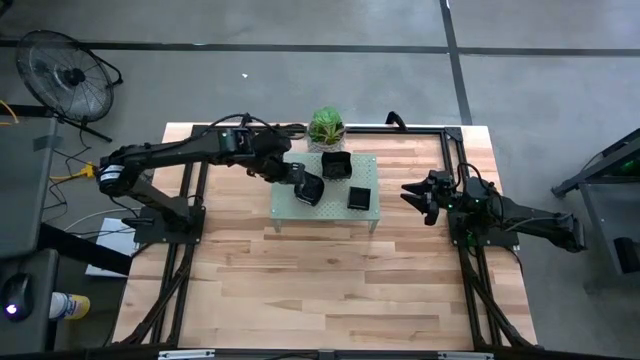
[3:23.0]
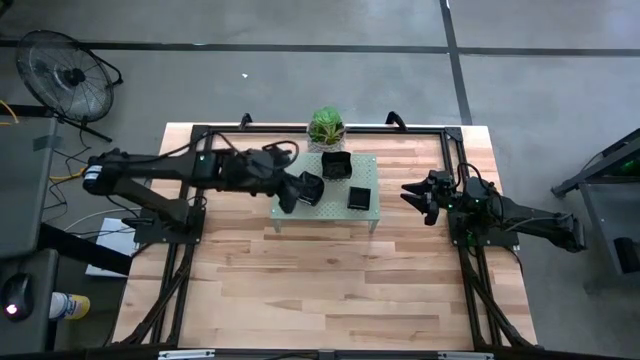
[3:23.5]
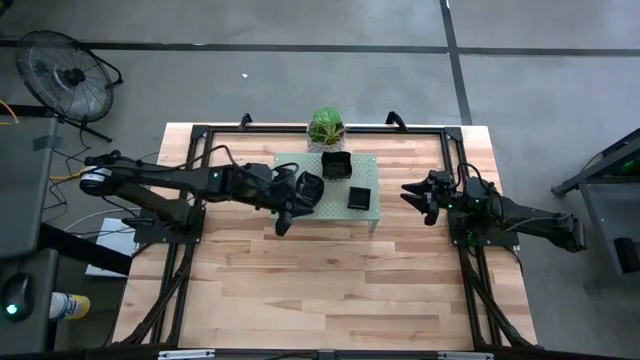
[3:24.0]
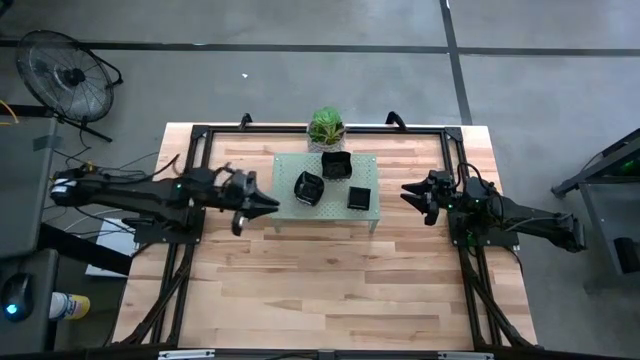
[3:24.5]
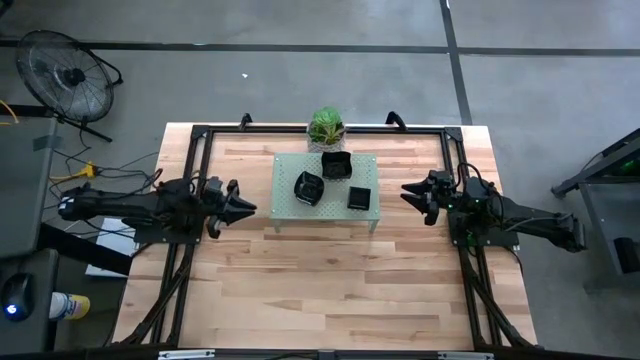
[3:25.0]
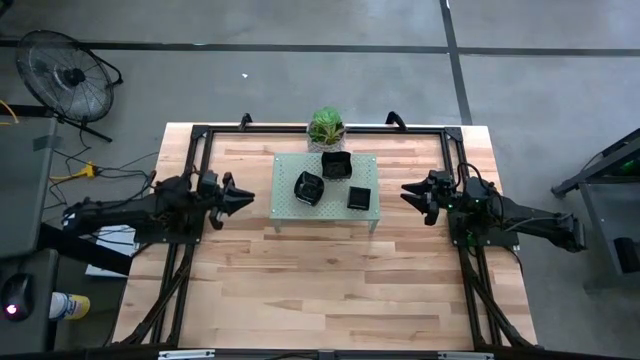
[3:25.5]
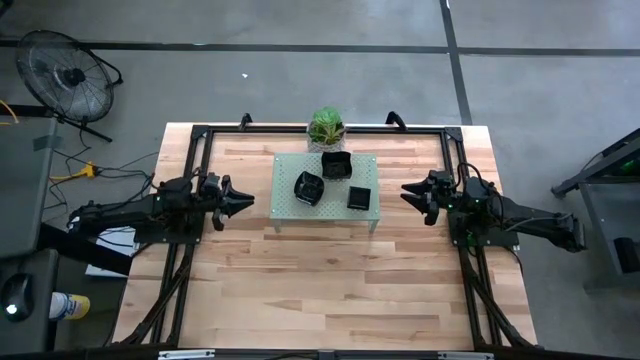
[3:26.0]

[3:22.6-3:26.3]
Task: Pick & Place Mini shaped plates
Return to Home Position

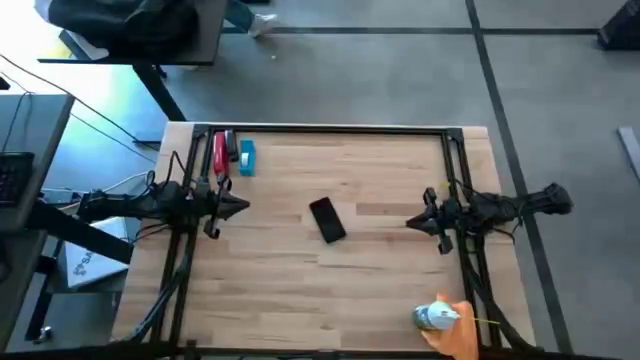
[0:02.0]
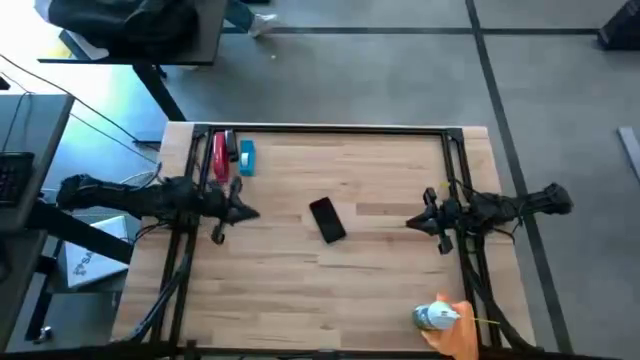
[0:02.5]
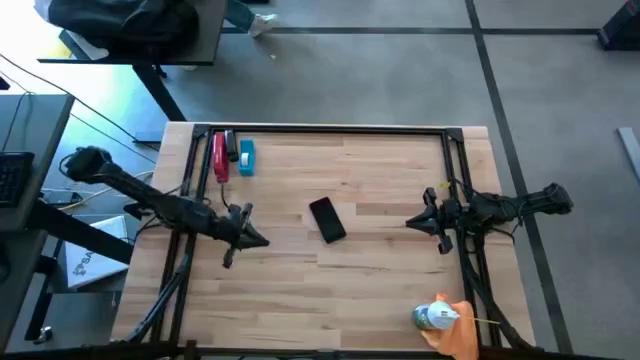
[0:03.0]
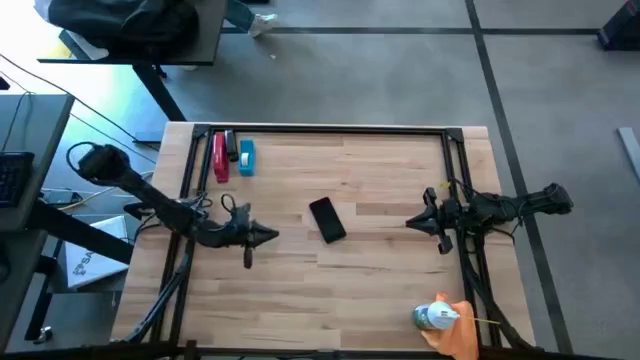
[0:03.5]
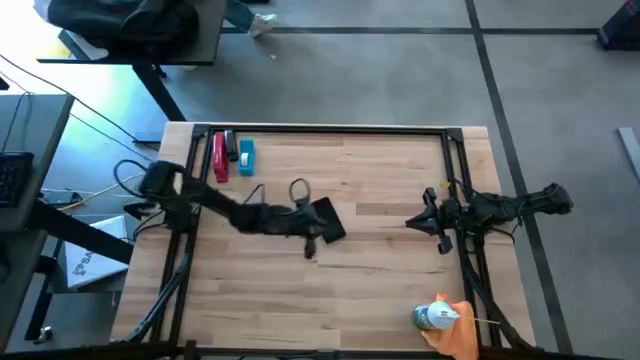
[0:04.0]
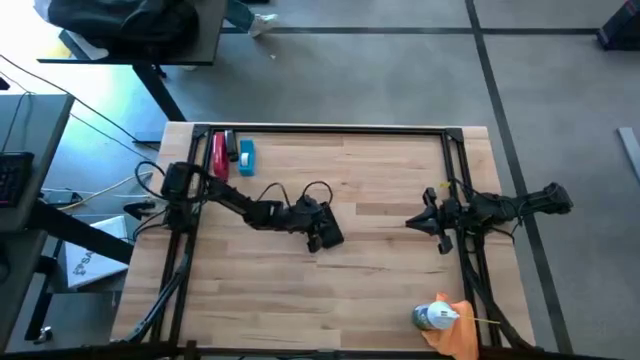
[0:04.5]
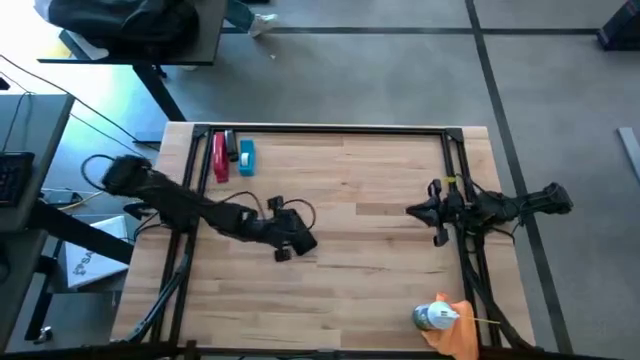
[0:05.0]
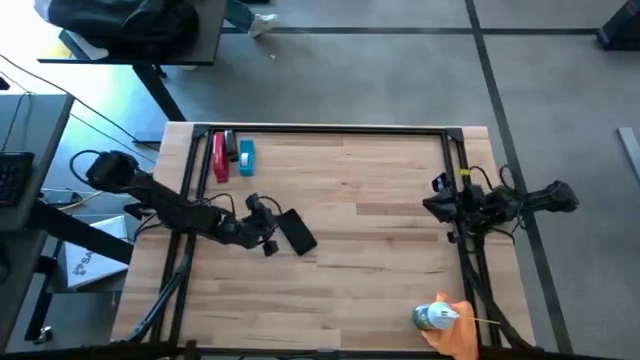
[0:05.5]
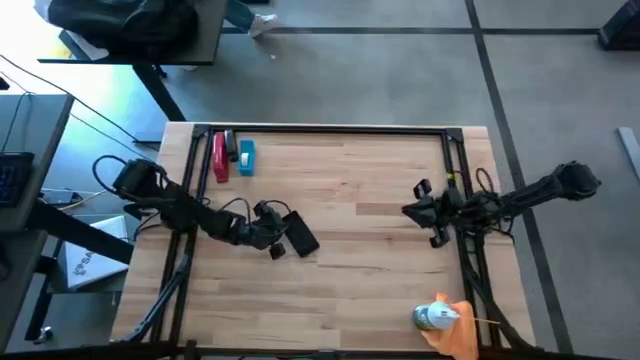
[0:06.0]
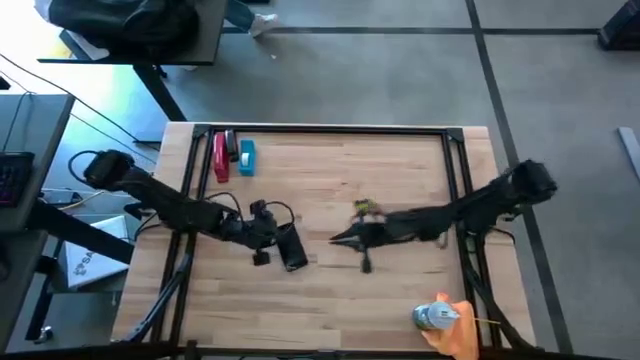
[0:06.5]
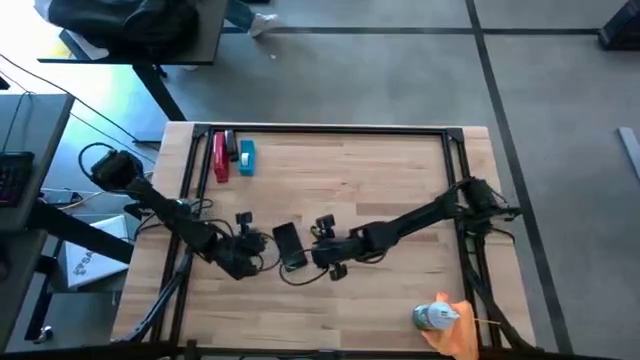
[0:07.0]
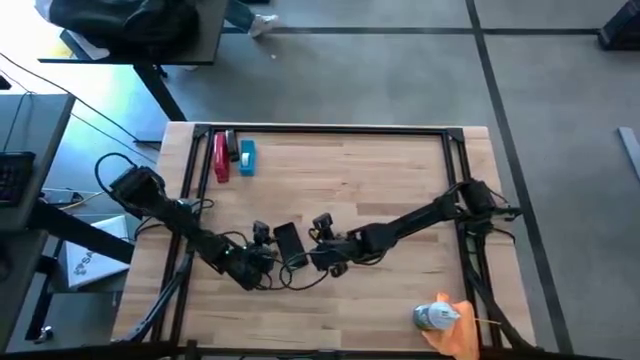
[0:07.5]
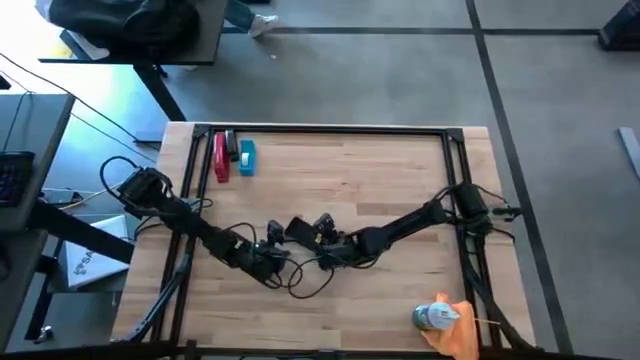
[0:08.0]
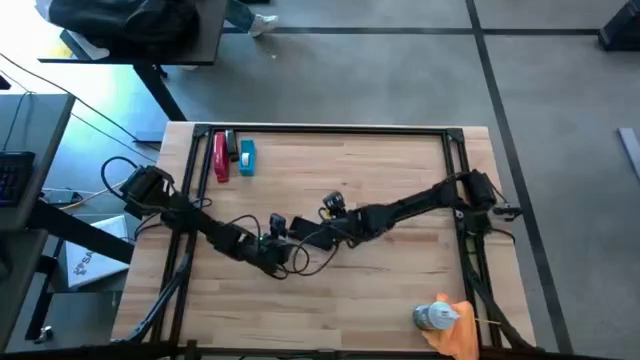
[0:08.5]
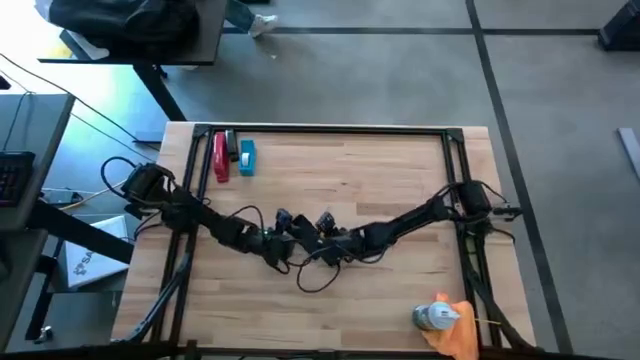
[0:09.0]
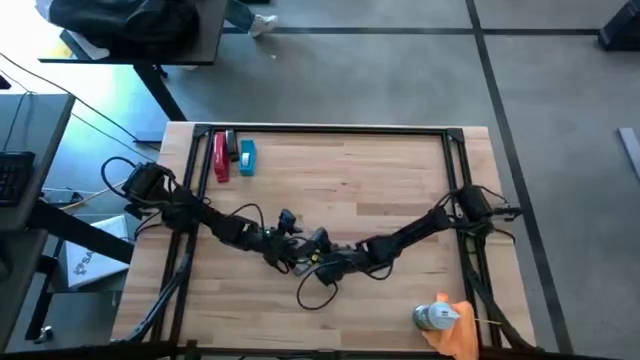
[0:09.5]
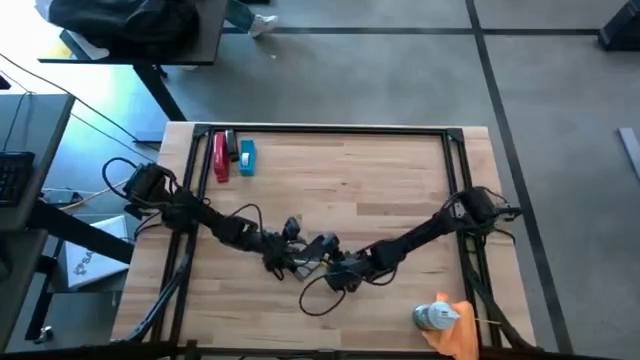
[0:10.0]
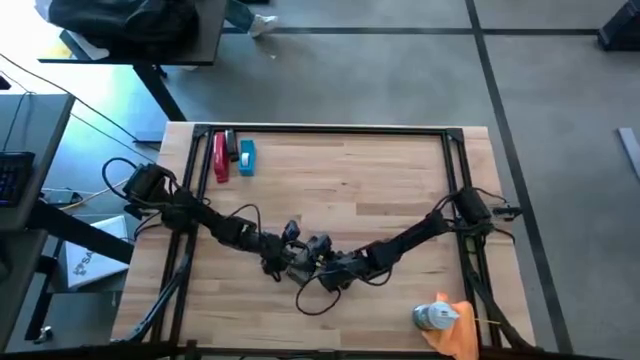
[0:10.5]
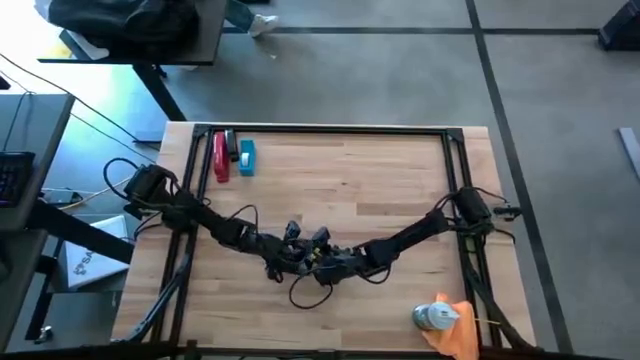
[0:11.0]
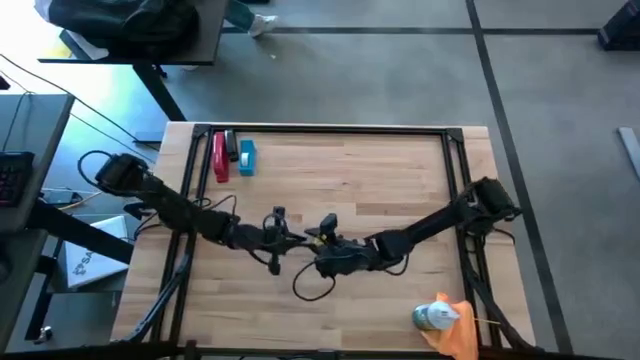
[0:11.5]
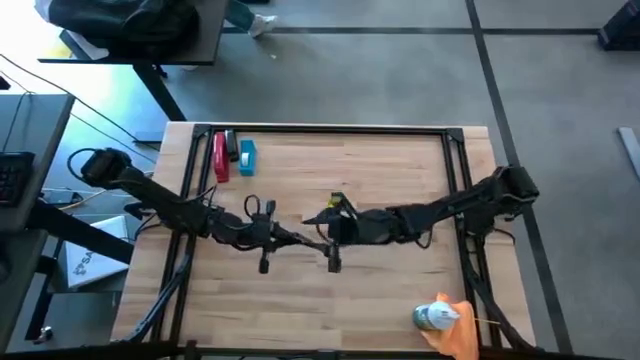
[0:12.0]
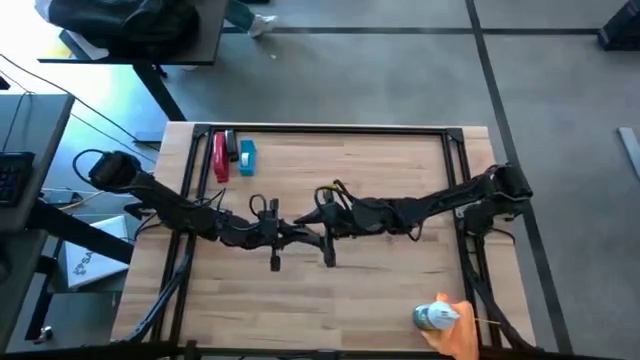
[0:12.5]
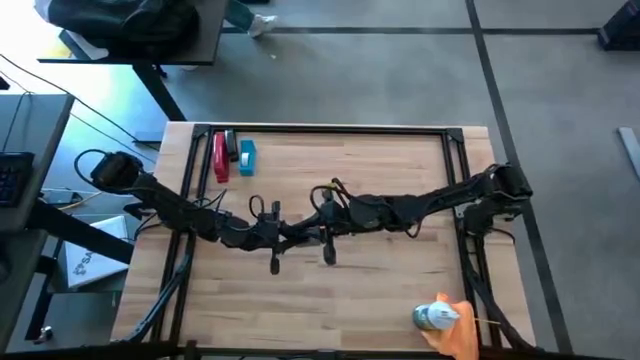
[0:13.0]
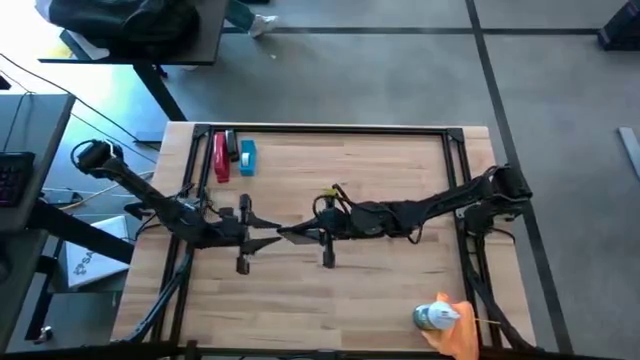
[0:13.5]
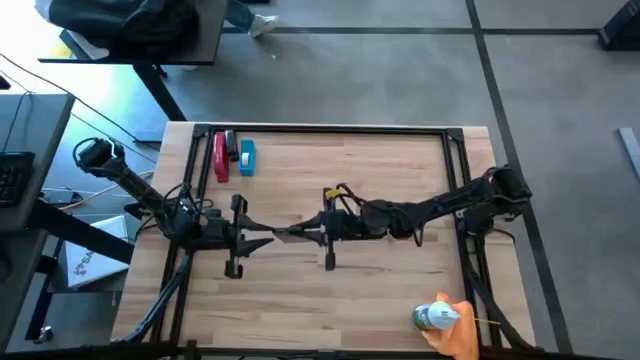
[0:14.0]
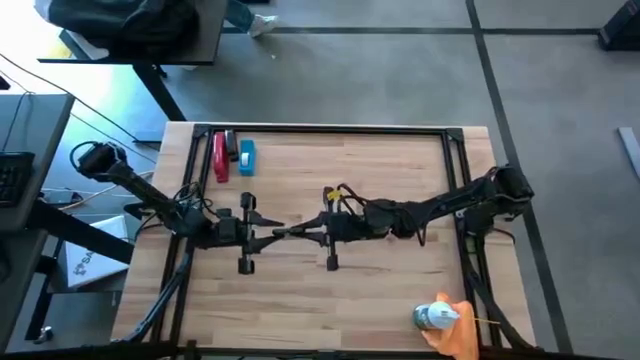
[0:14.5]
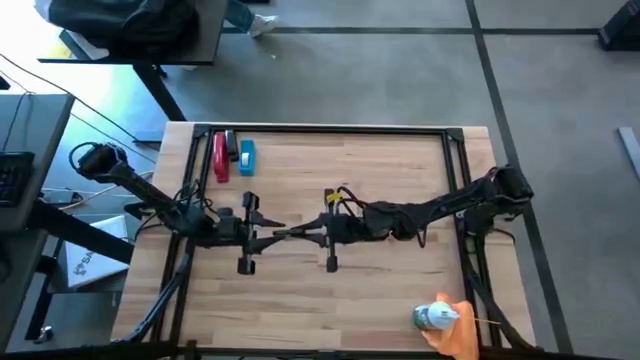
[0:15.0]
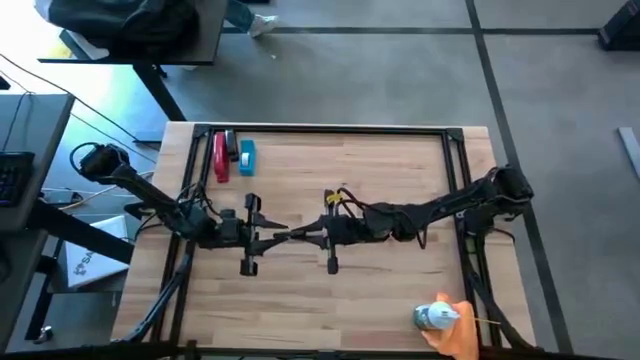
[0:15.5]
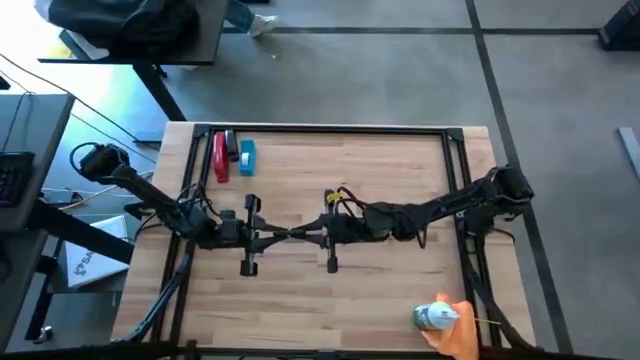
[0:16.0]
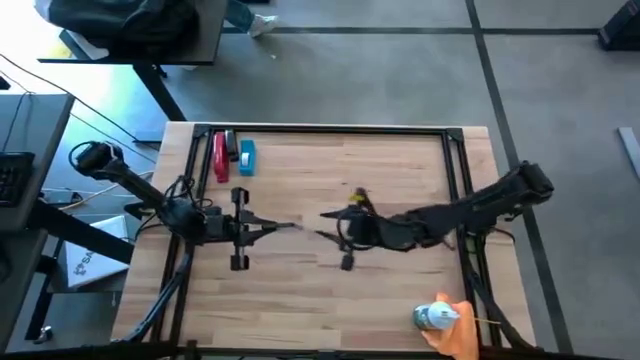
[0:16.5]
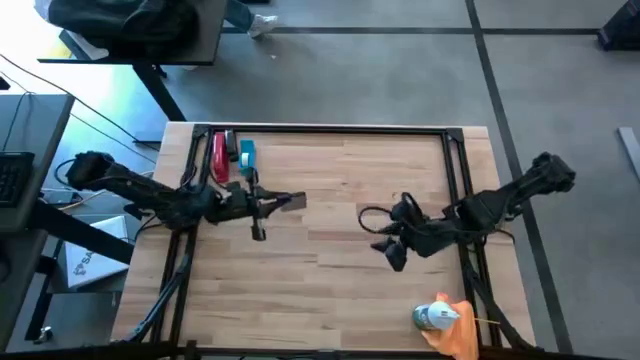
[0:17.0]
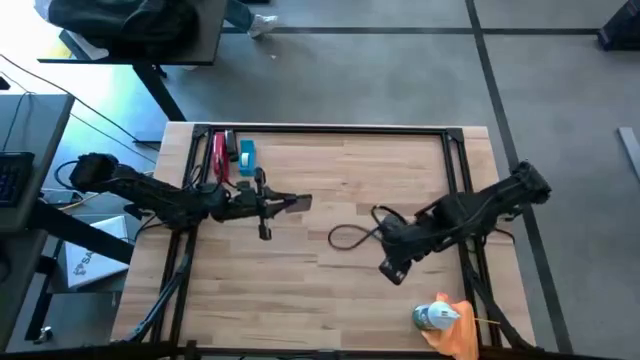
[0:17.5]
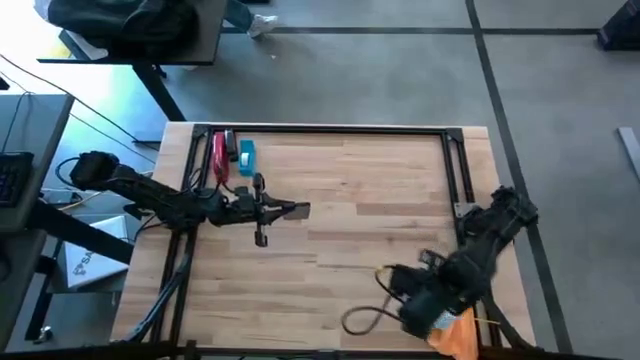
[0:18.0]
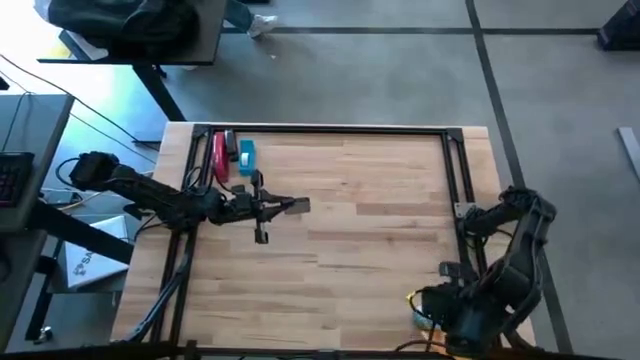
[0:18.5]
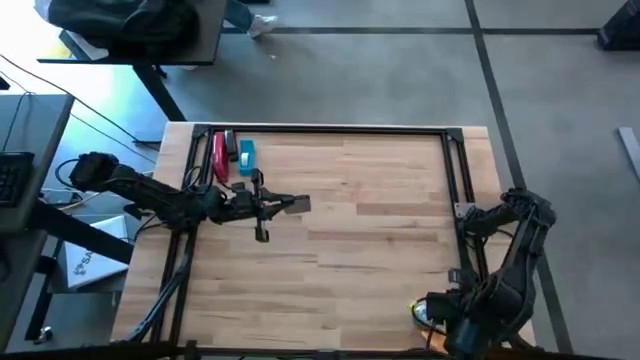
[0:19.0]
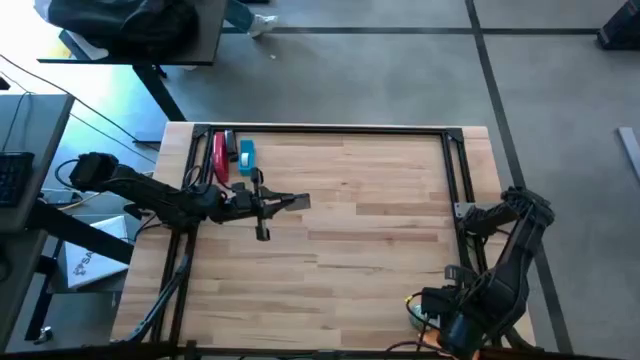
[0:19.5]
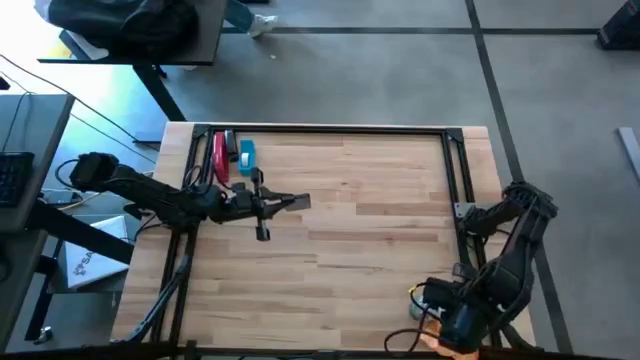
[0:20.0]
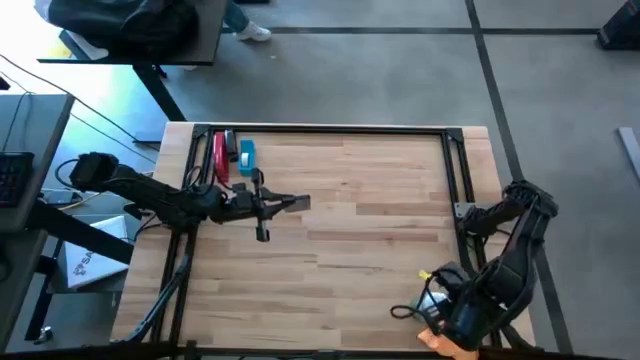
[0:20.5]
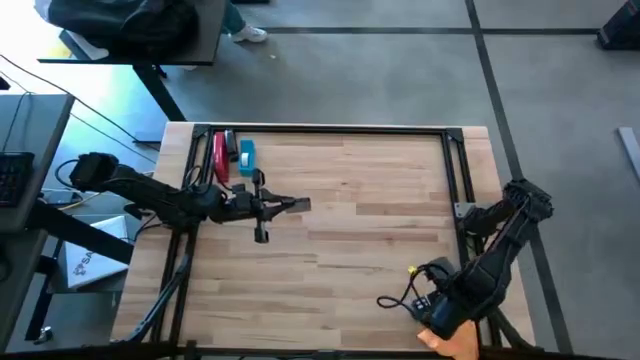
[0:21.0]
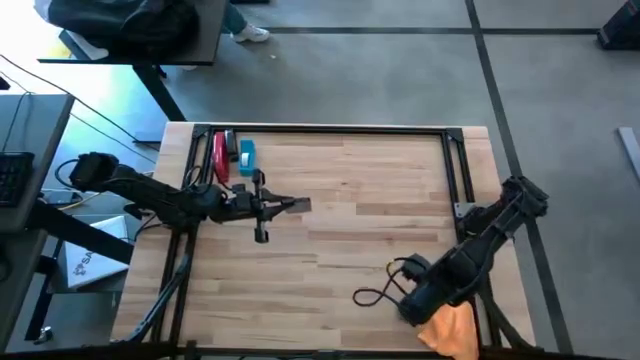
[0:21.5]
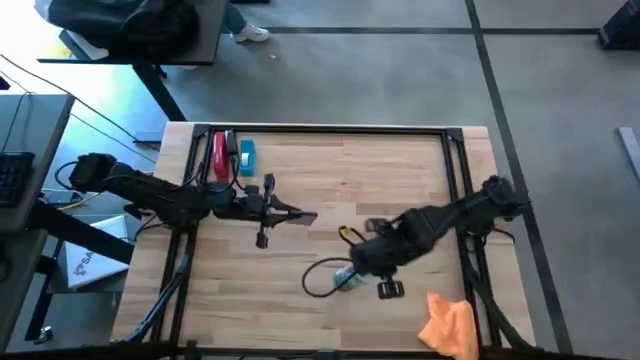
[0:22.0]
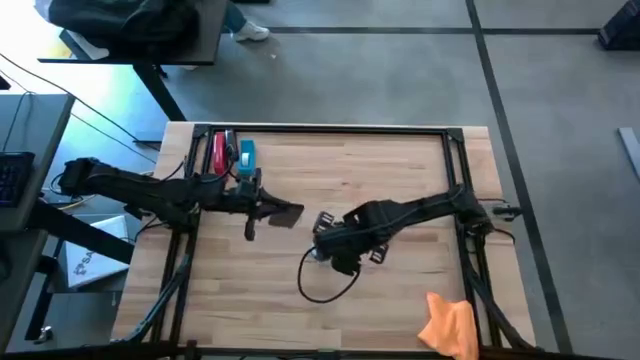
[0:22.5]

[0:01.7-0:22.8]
Task: Apply microfiber cloth
Spray the front and back of the black cellphone using the white spray bottle
